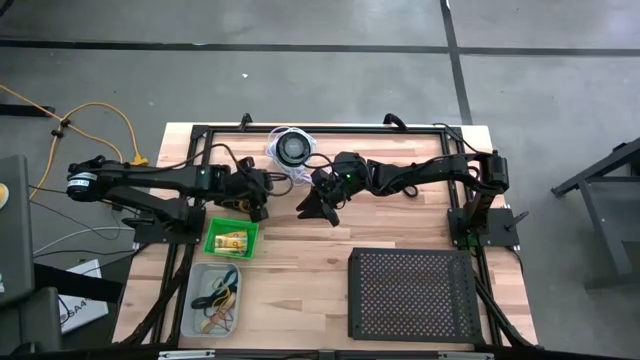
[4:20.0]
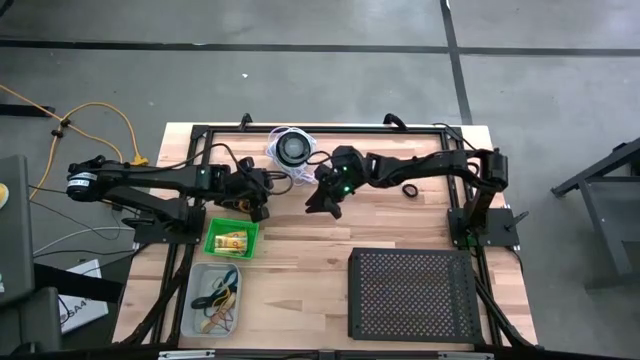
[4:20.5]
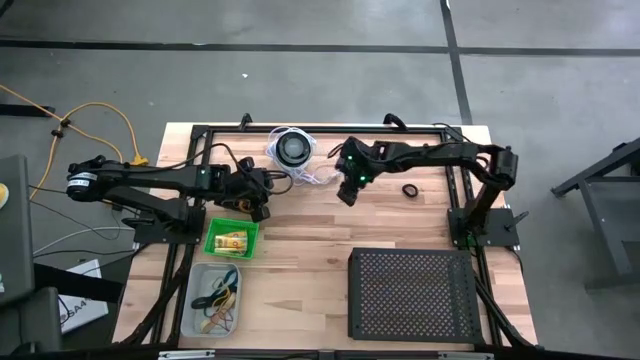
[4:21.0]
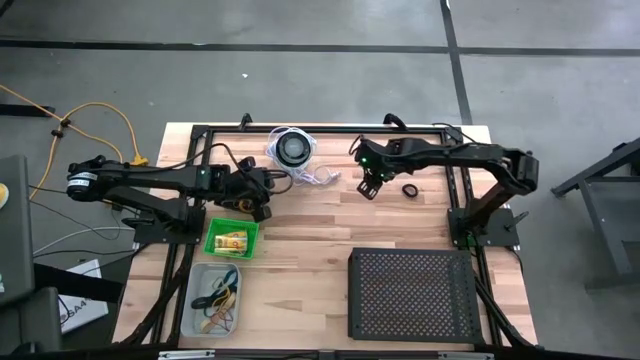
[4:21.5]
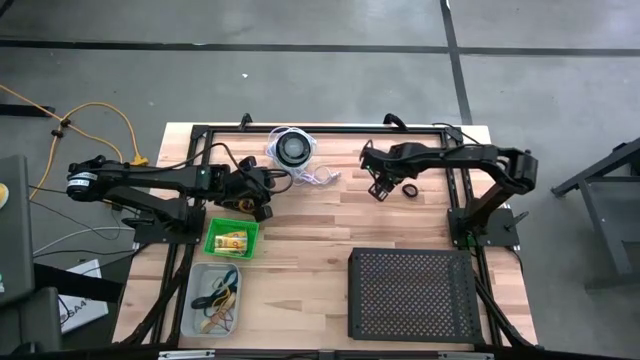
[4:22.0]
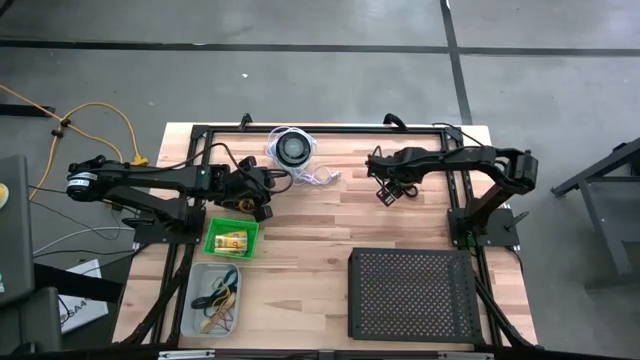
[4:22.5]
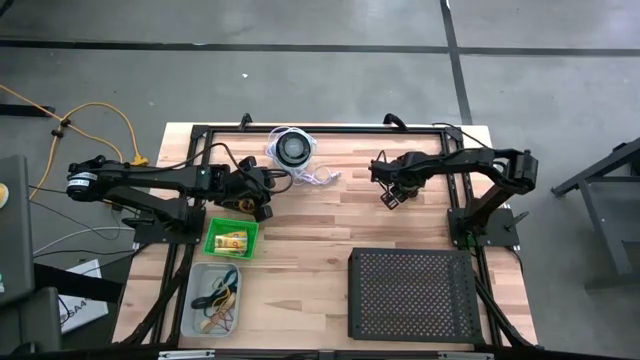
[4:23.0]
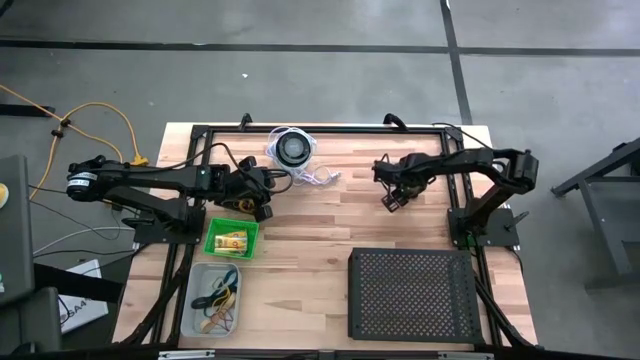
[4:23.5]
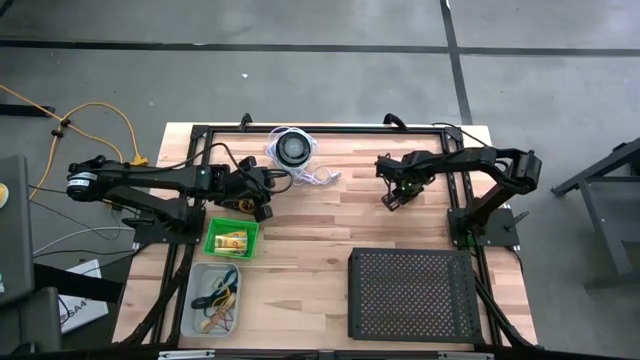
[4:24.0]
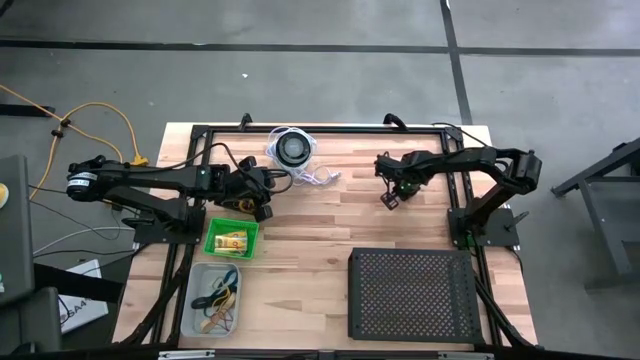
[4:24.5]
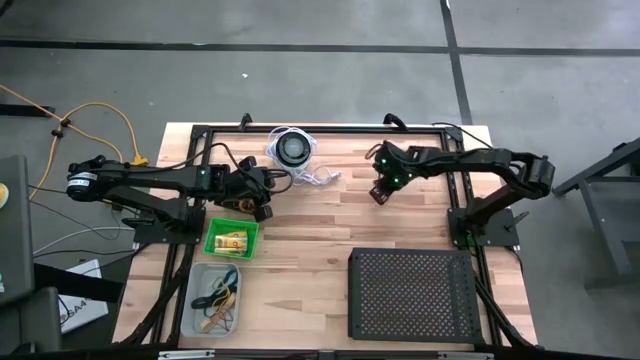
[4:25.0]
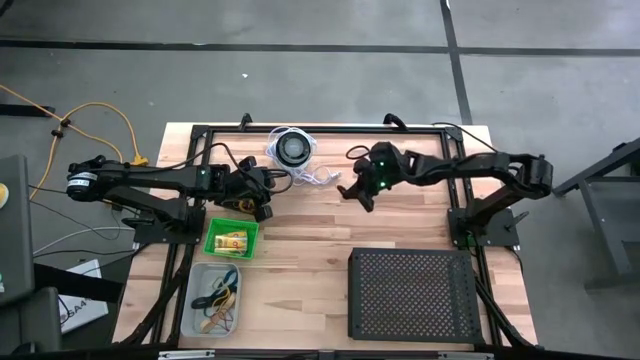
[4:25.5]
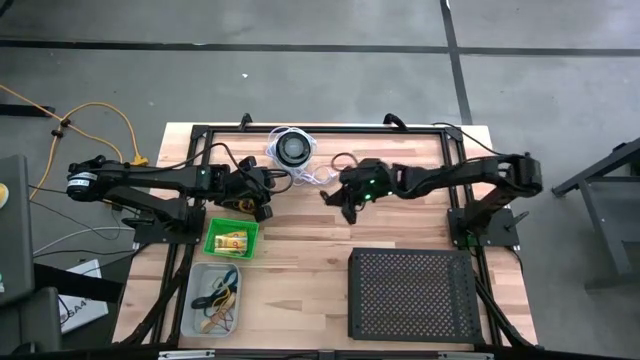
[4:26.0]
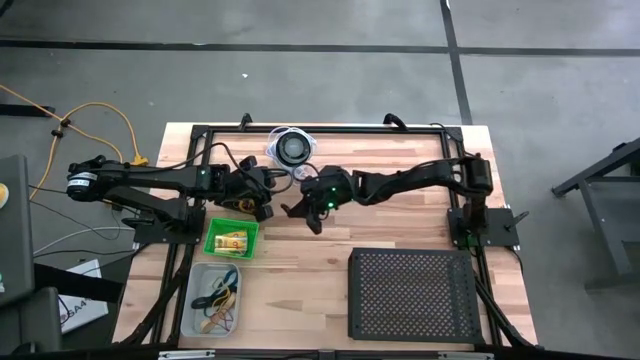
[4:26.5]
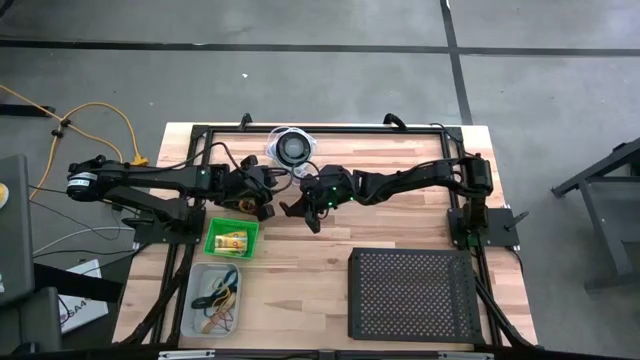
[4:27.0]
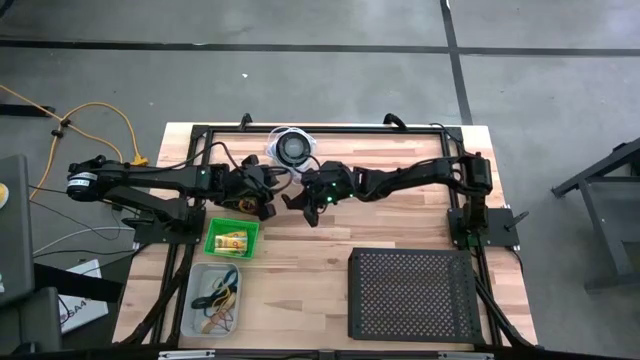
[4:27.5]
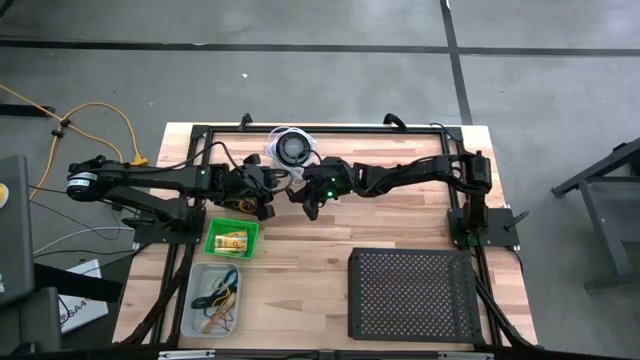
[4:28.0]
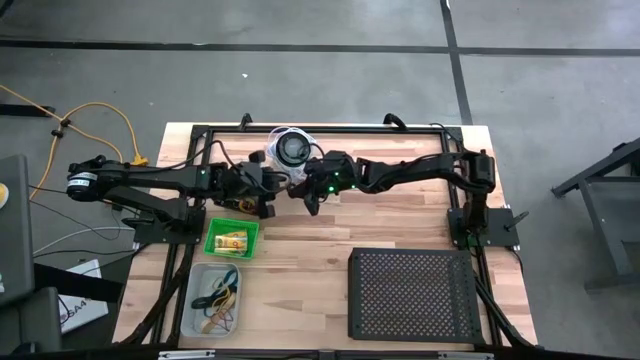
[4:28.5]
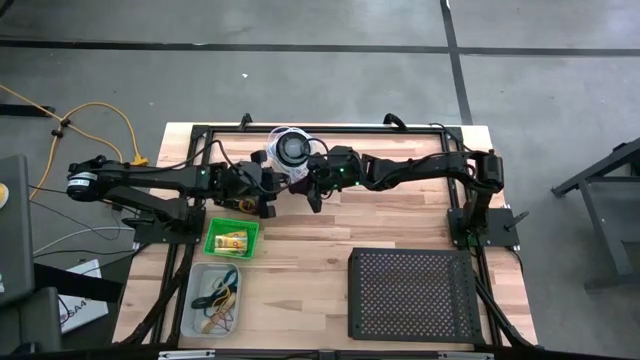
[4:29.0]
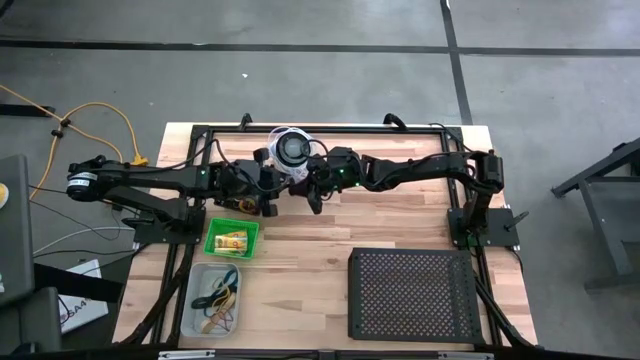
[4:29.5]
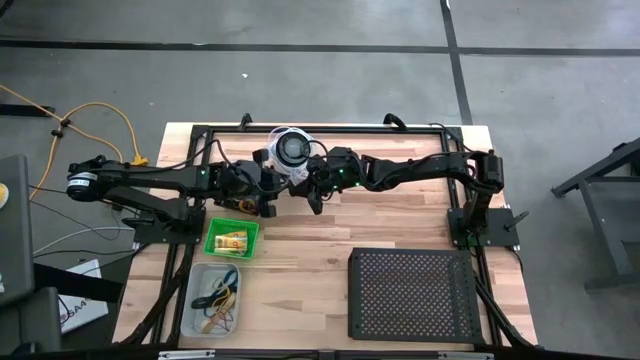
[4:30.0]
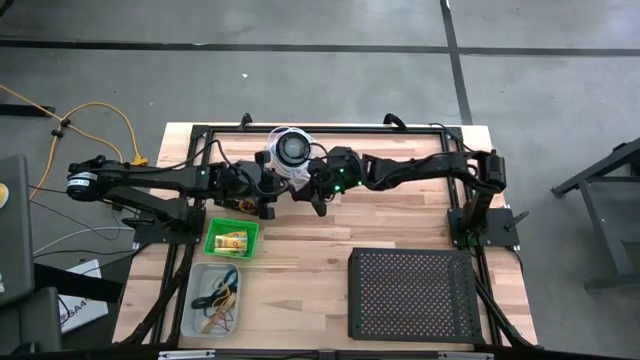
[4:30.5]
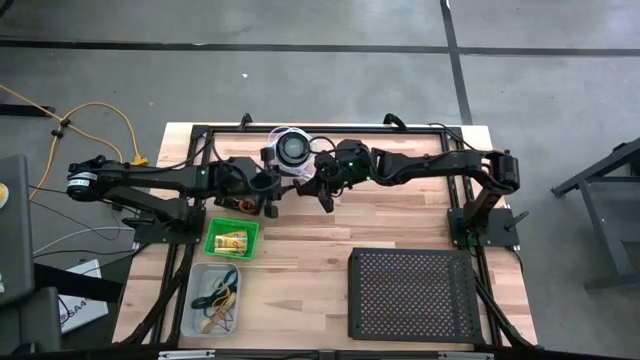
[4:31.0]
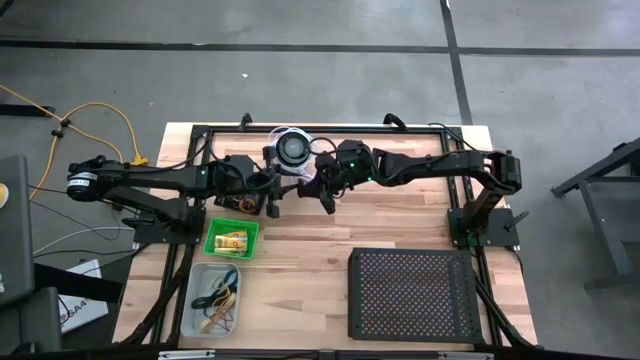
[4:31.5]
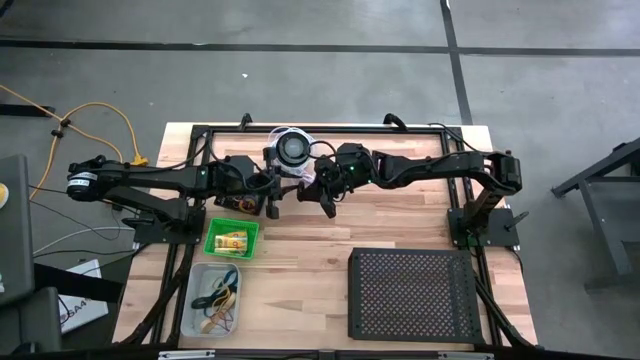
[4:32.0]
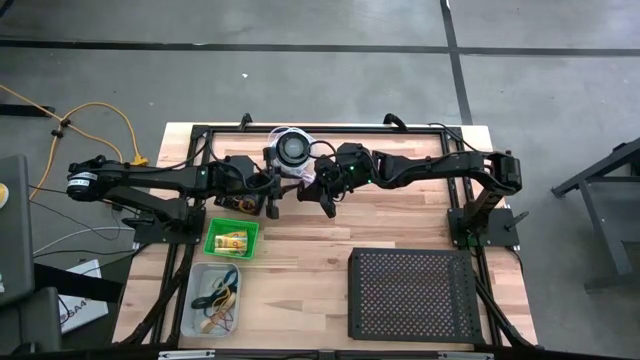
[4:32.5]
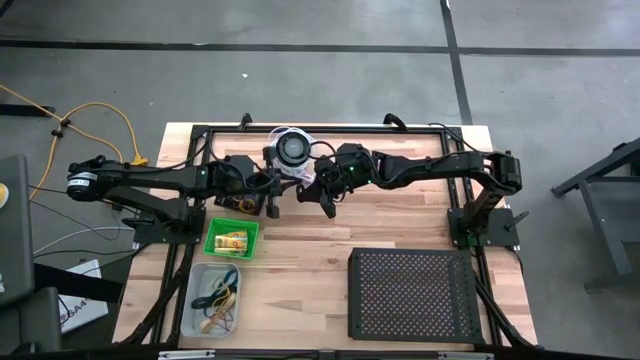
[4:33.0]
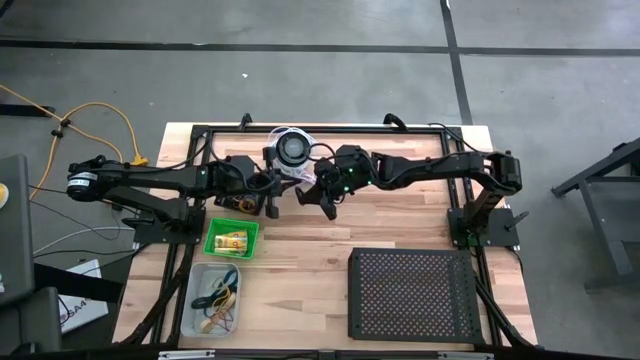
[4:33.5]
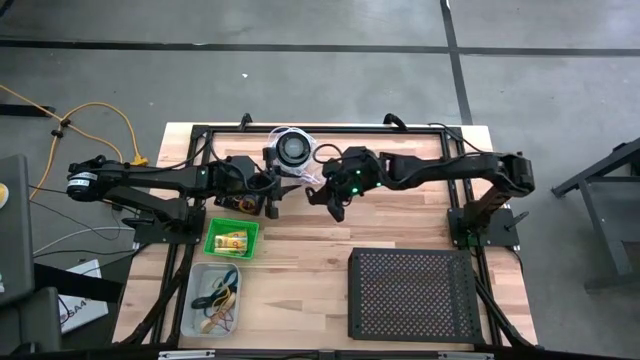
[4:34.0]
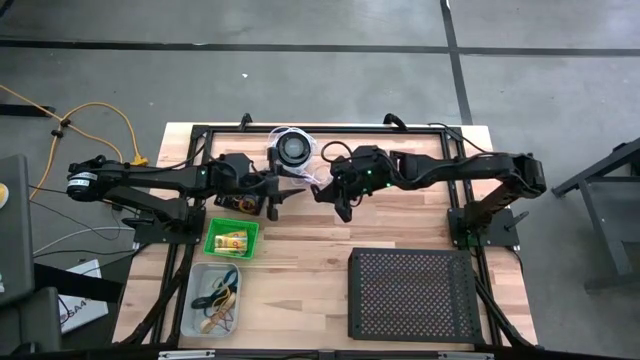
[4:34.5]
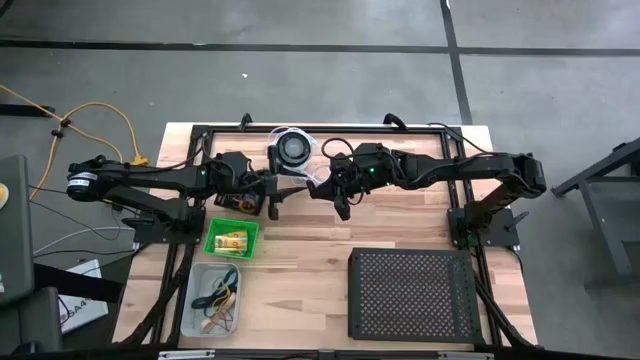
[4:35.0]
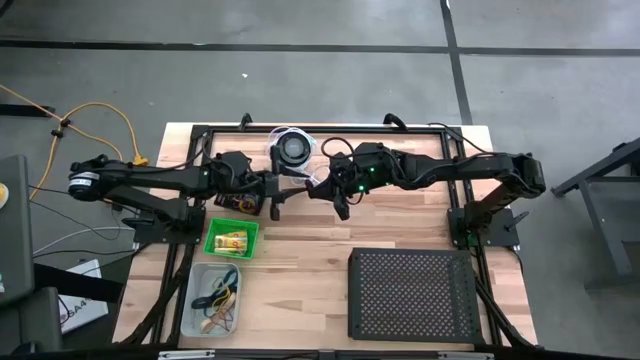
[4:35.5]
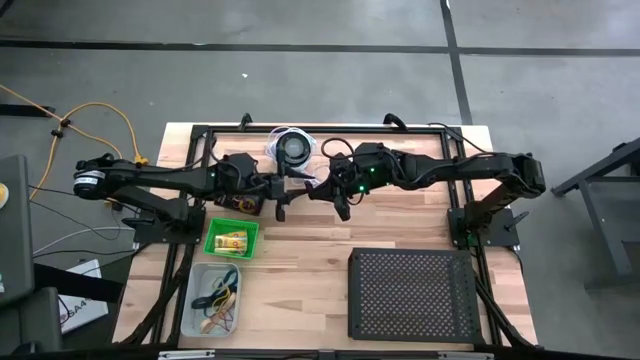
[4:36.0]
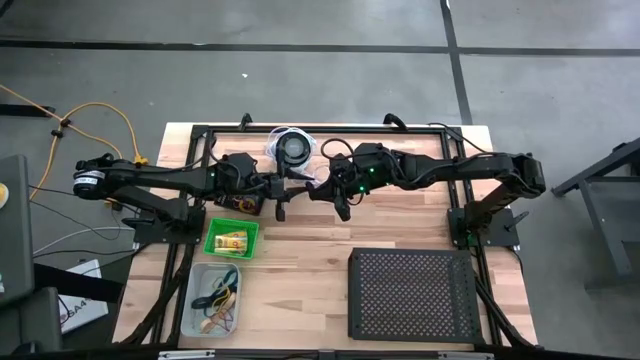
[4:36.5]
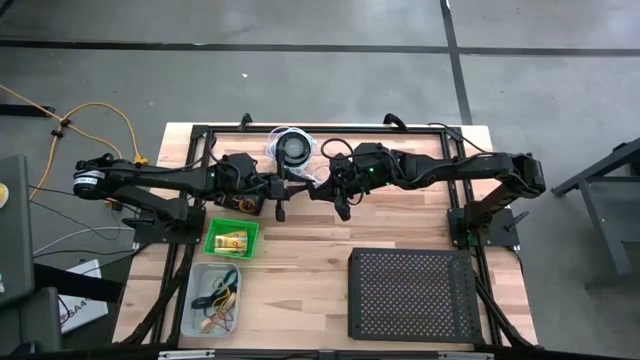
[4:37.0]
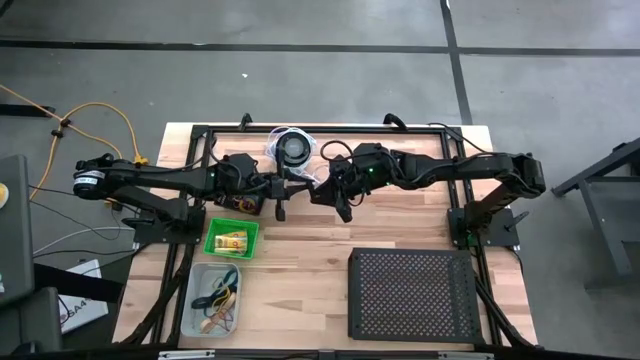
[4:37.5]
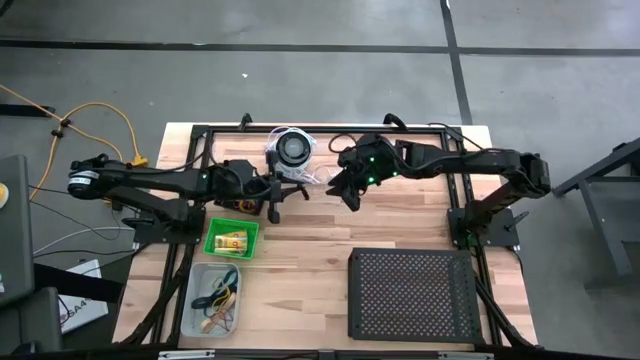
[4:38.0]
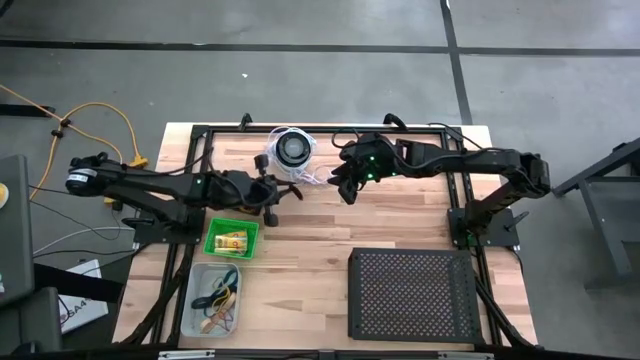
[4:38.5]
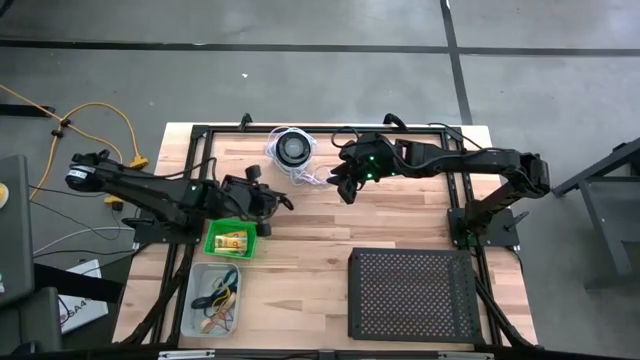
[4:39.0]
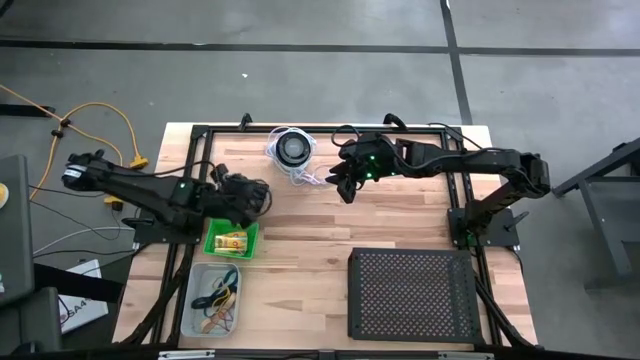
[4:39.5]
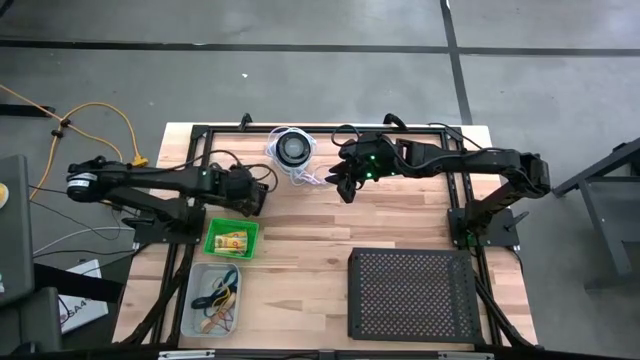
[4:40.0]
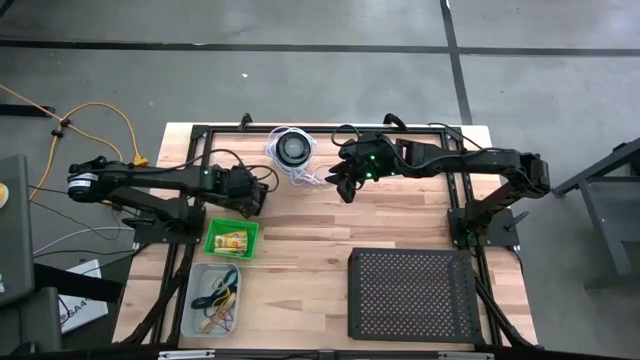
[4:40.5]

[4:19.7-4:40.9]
Task: Pick & Place Office Desk Supplies
Put the black coil keychain into the black bin
